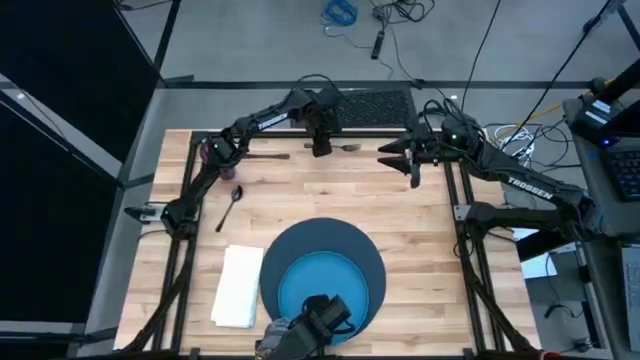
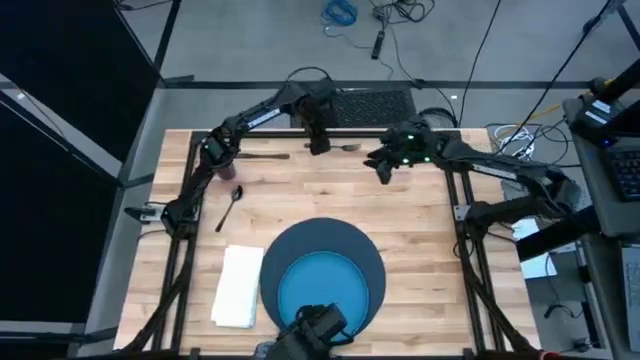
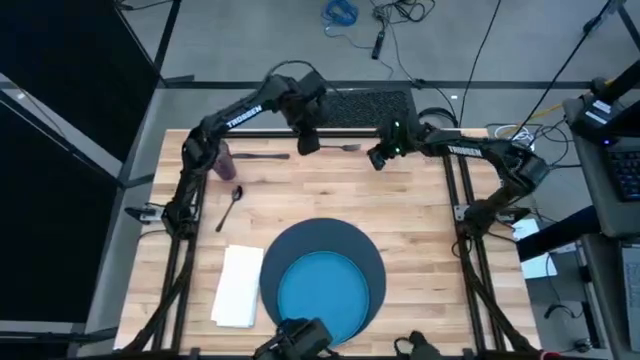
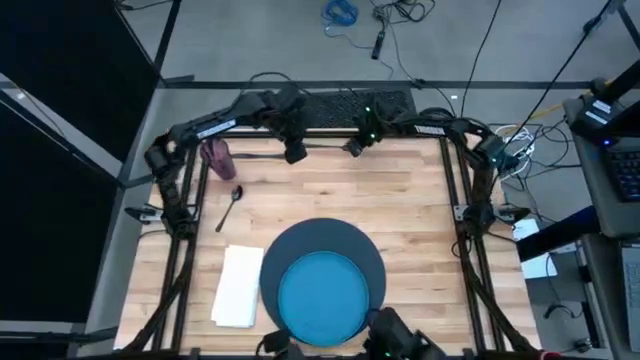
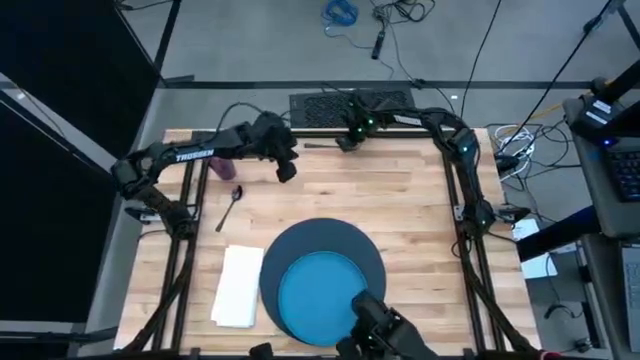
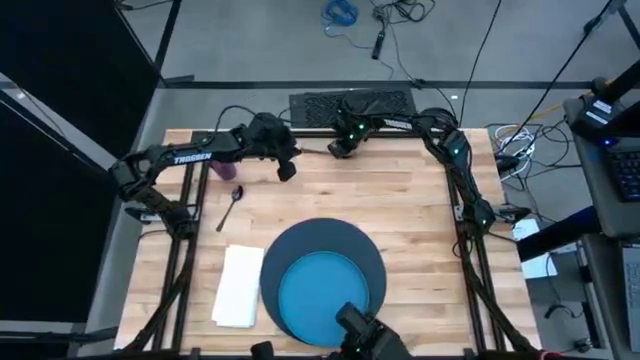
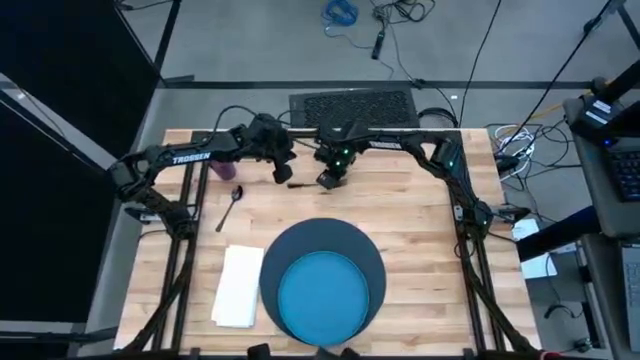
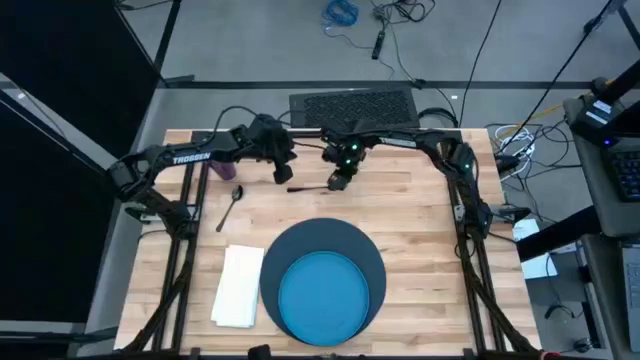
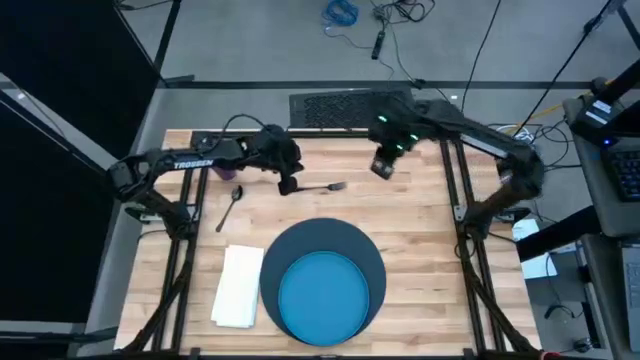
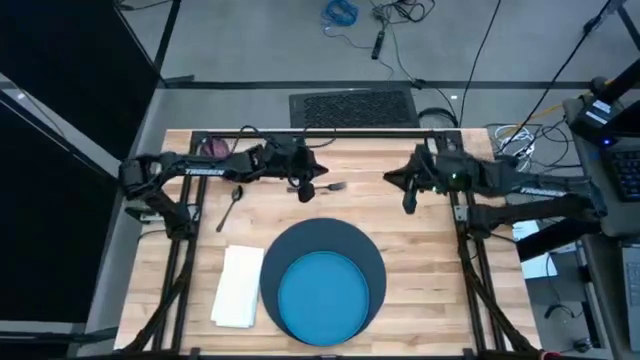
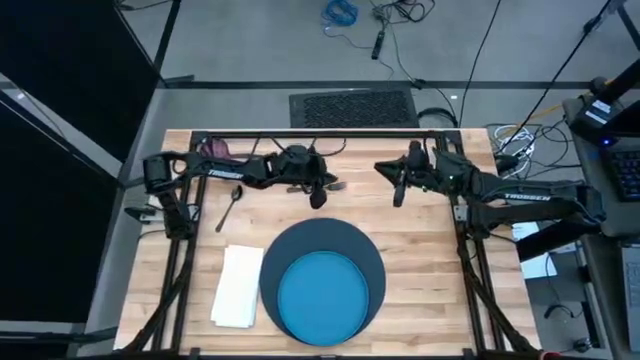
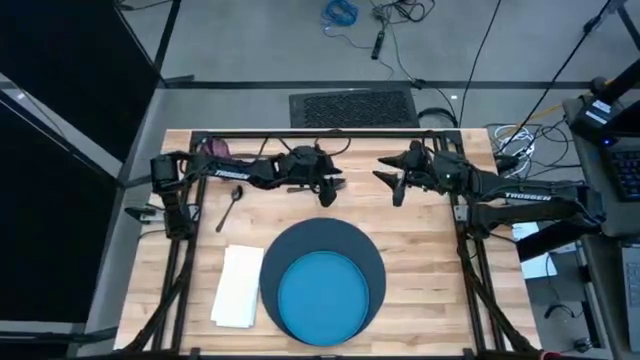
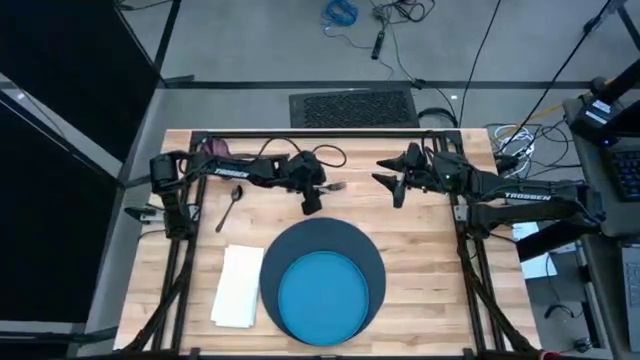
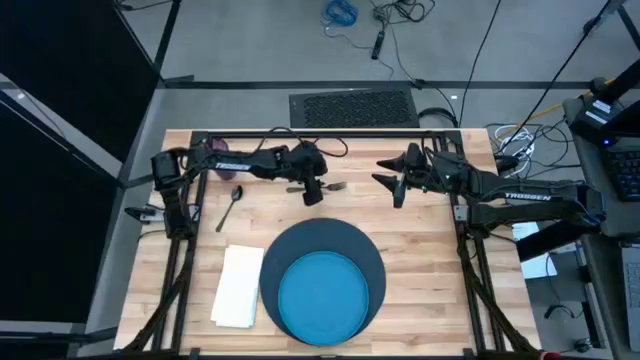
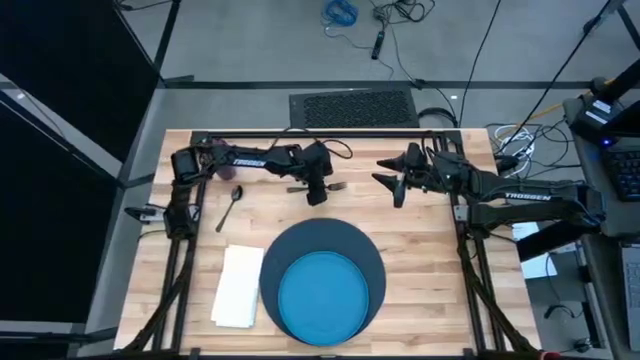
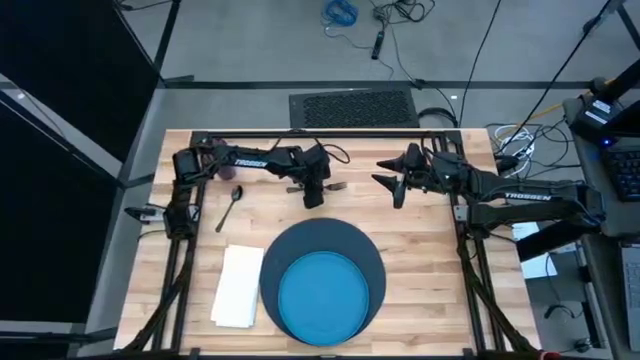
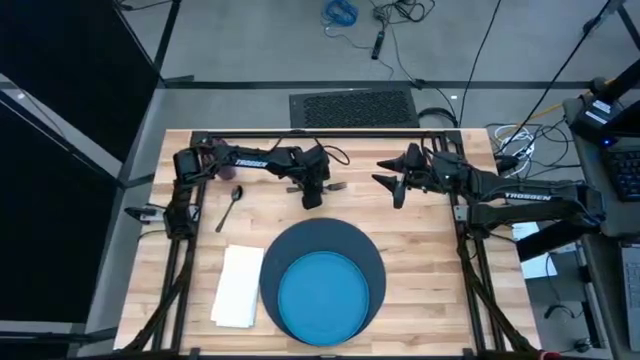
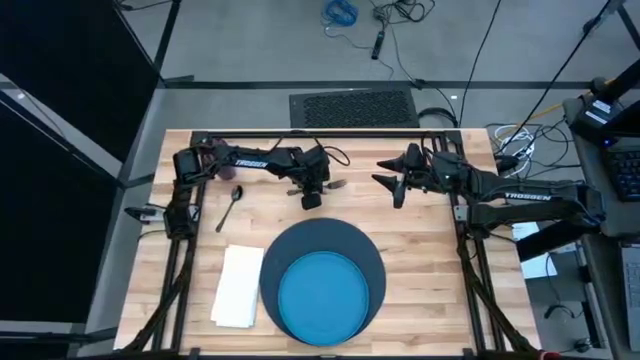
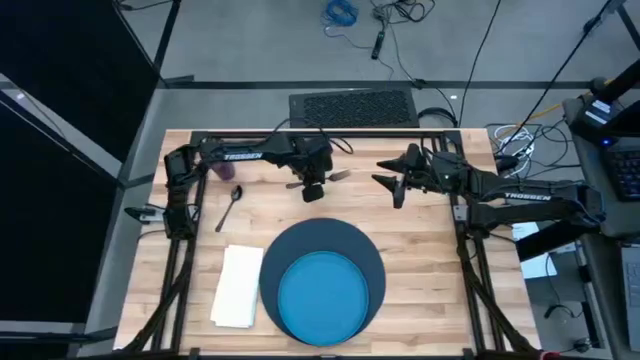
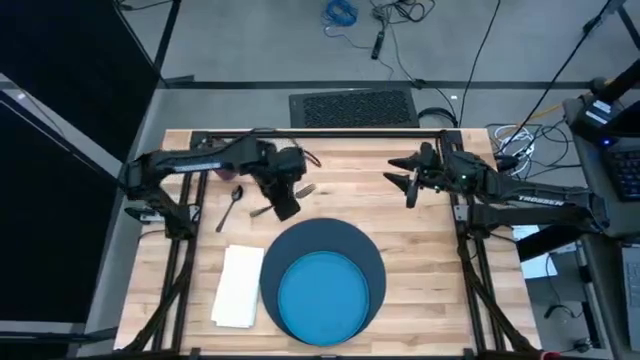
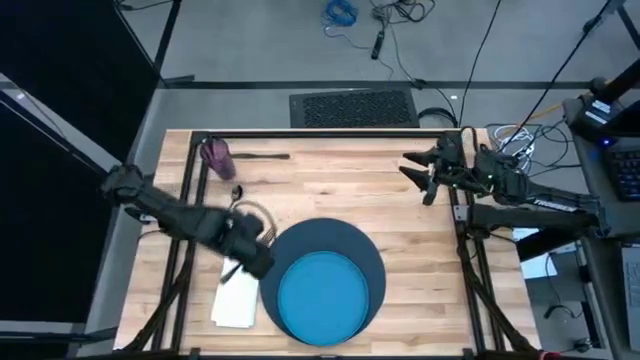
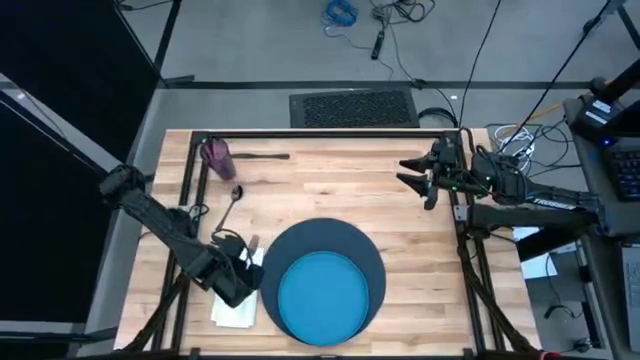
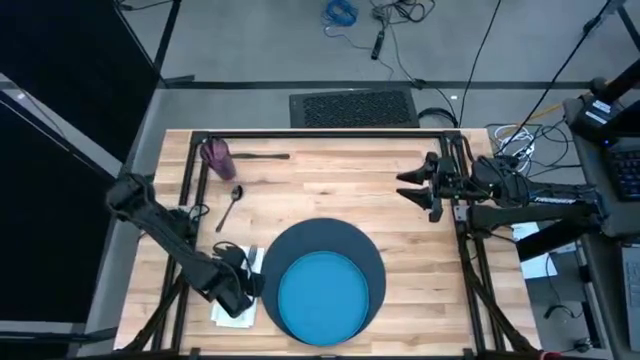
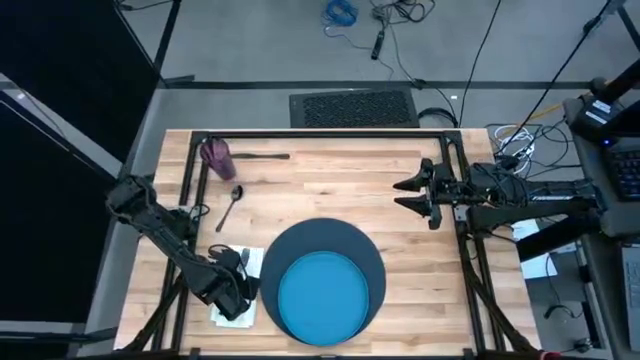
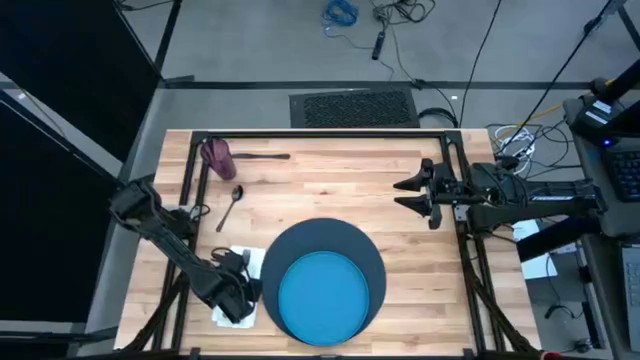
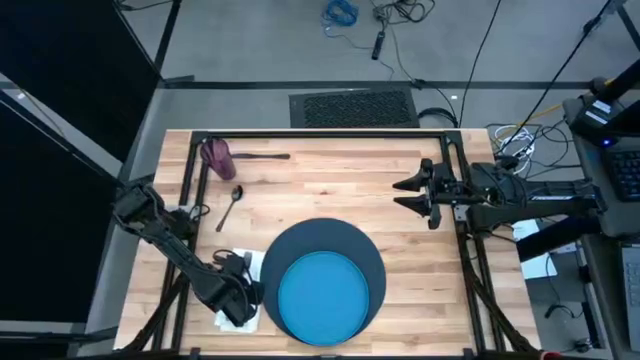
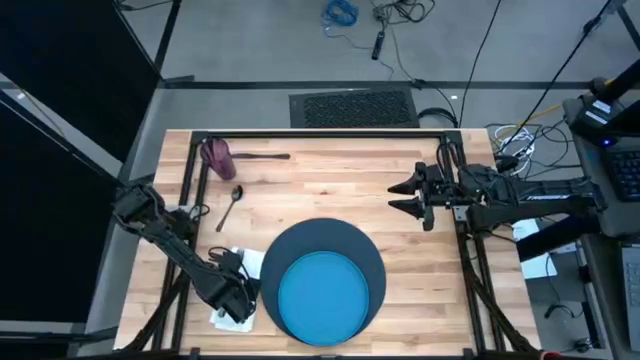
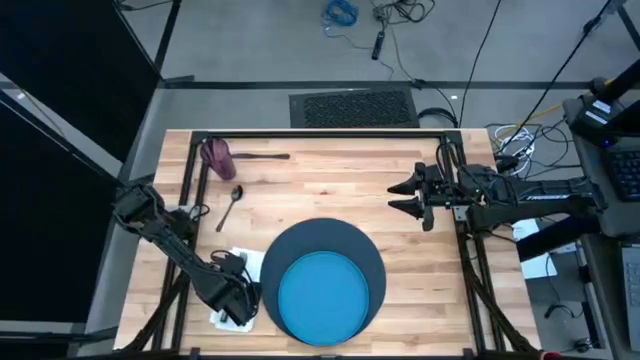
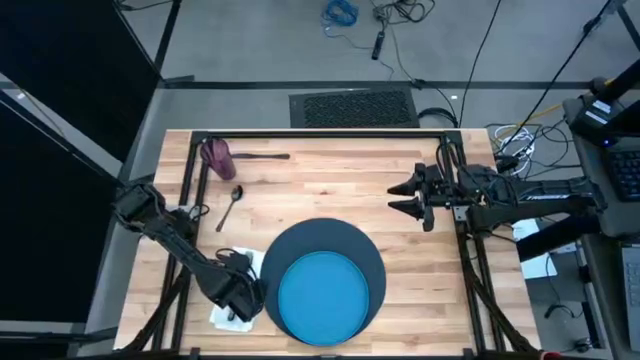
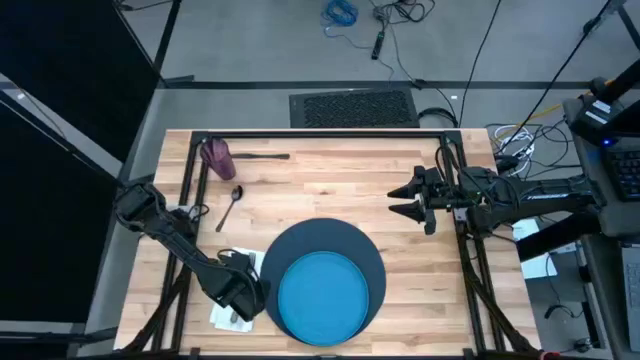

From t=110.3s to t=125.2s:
Task: Set table place
Put the fork on the white table napkin

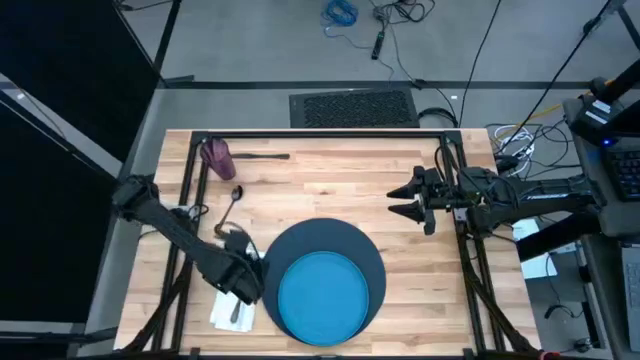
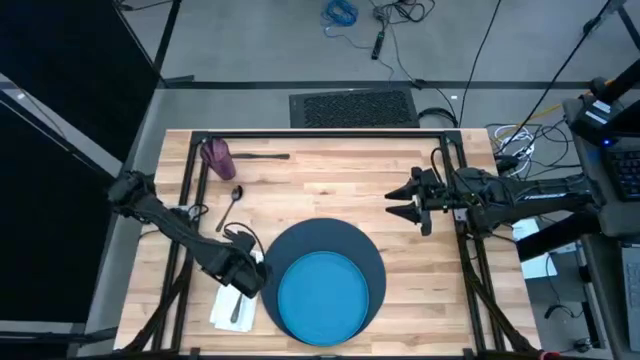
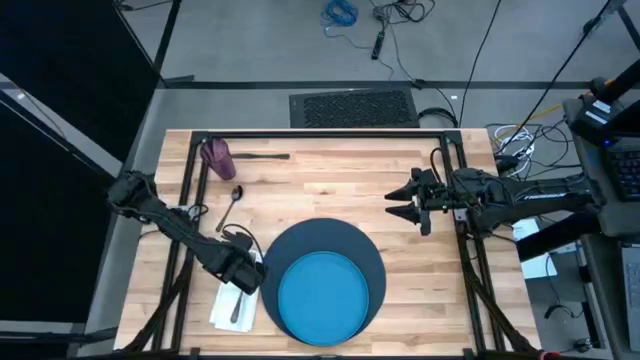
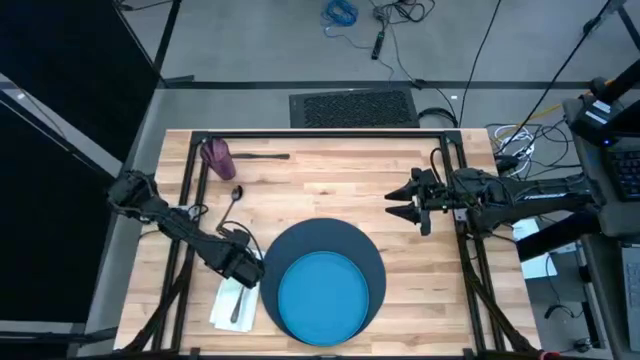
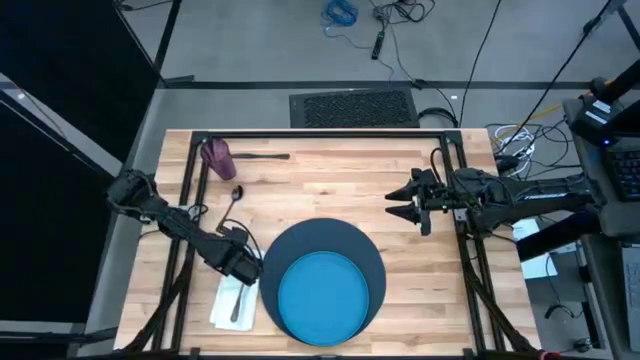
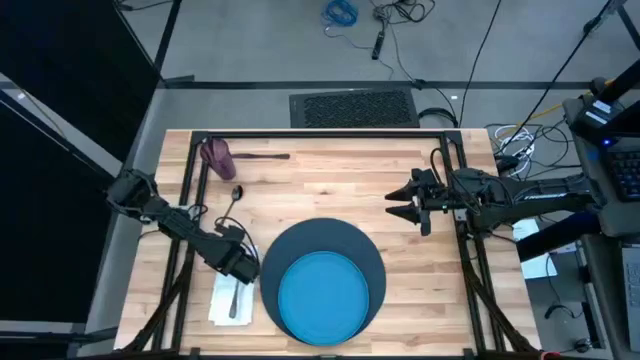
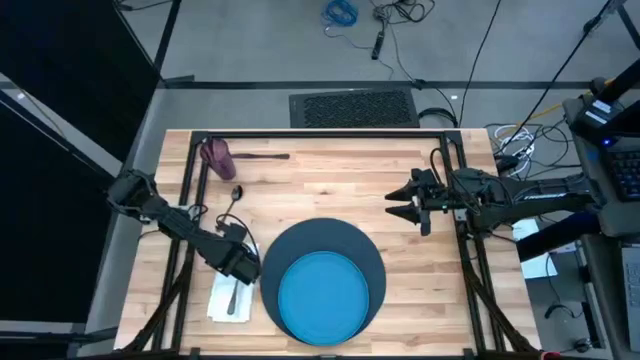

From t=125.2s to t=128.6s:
Adjust the white table napkin

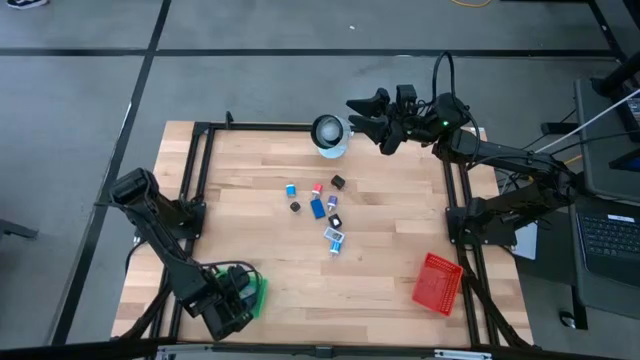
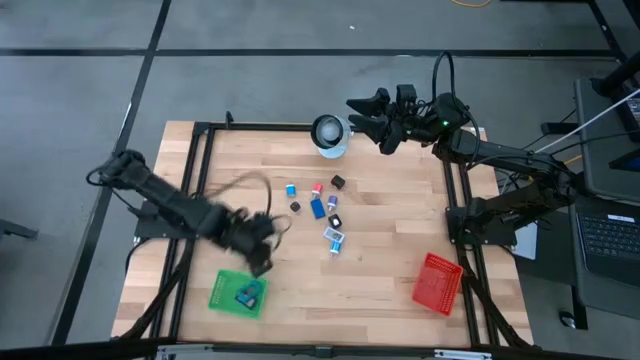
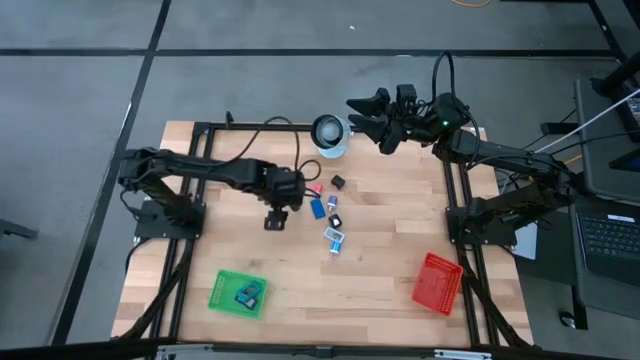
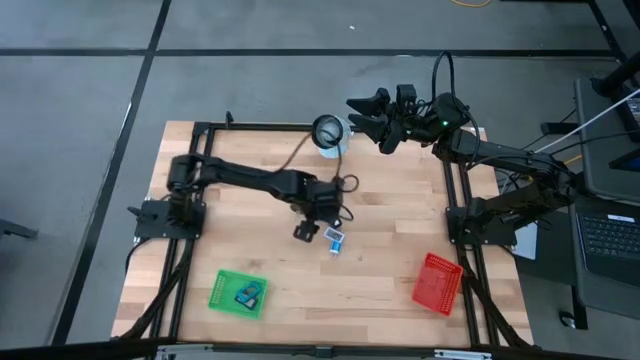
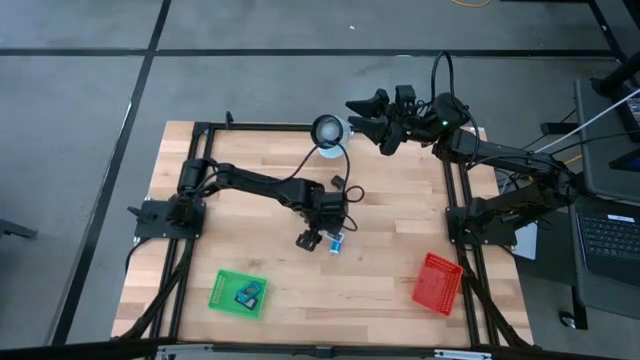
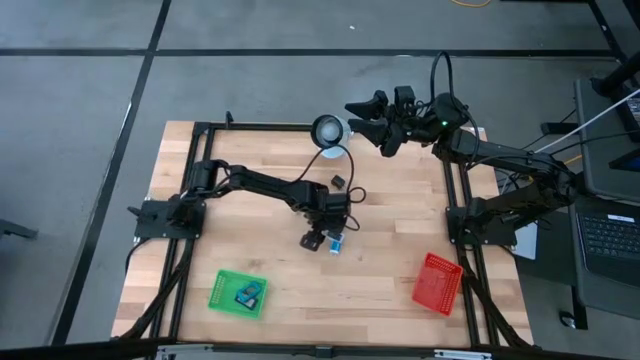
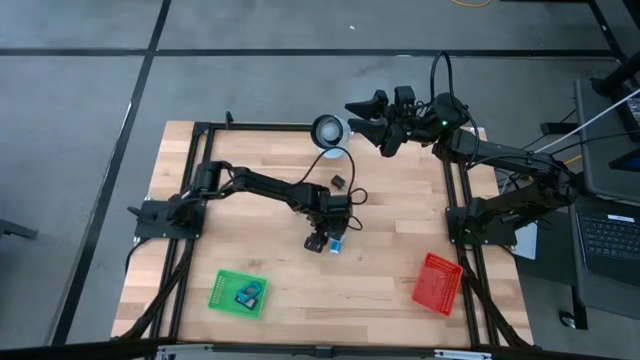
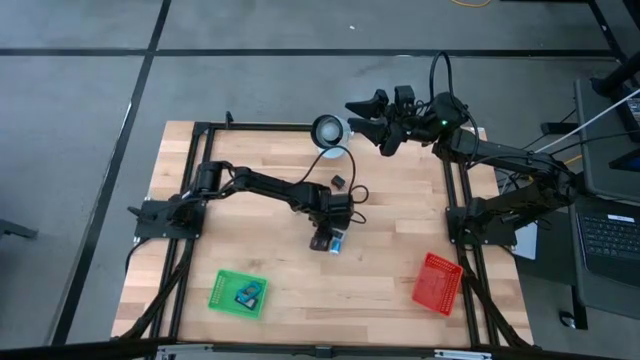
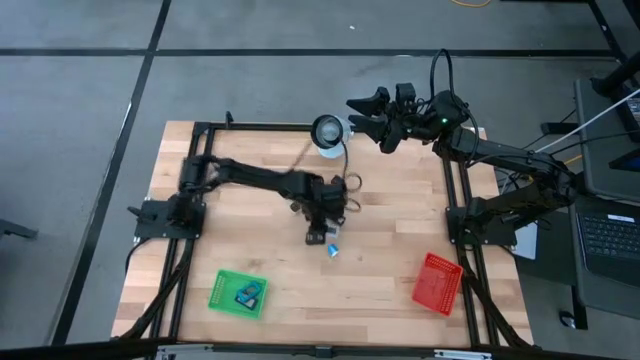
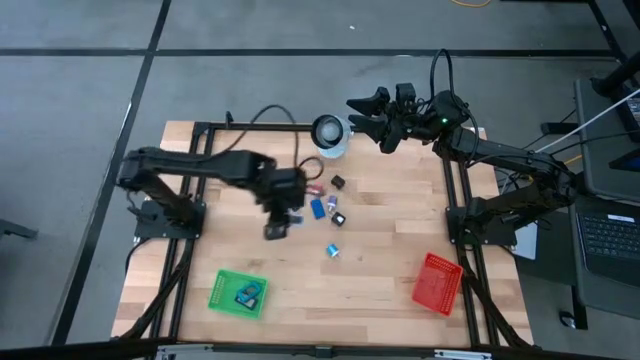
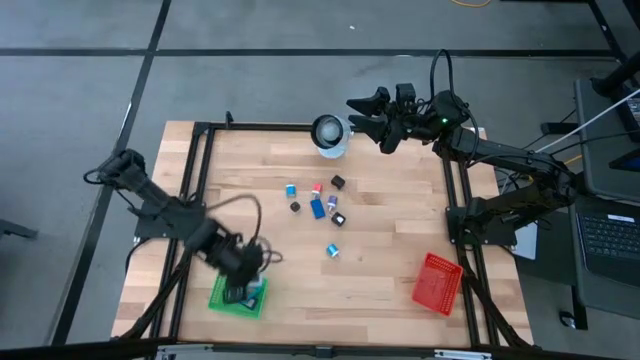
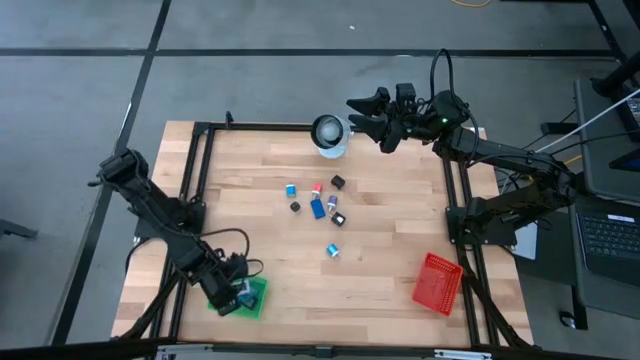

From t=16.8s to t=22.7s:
Task: Pick & Place Office items
Put the white digital clock into the green bin
